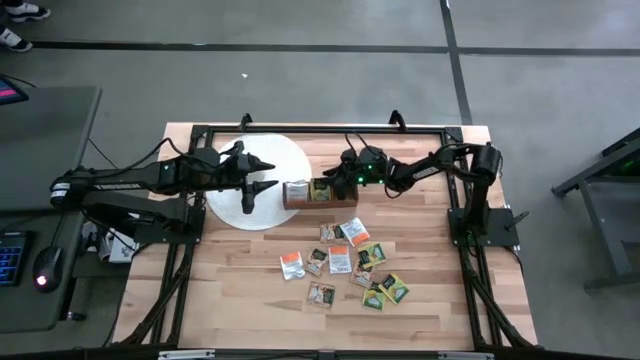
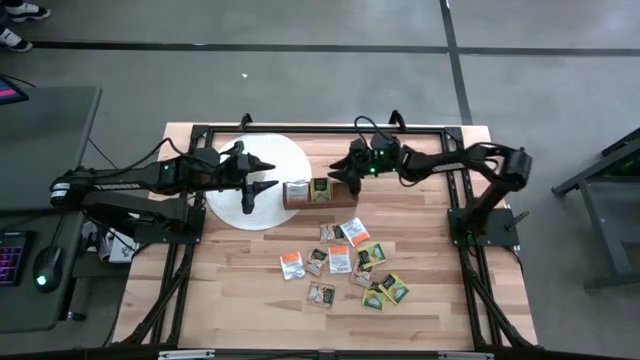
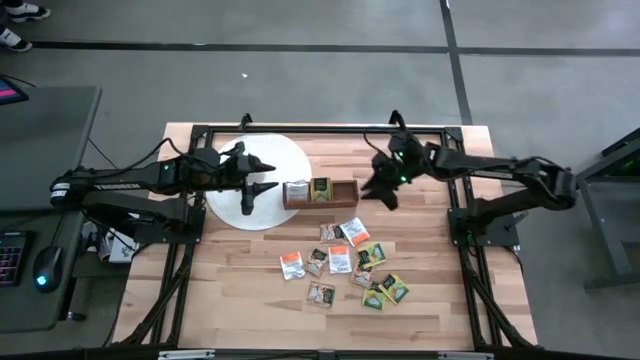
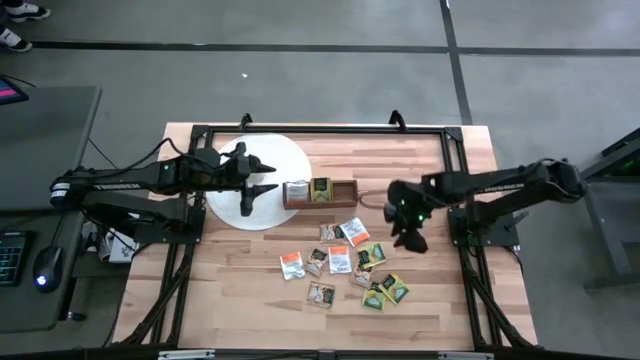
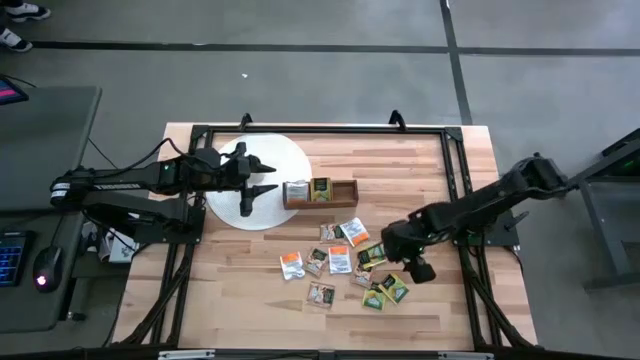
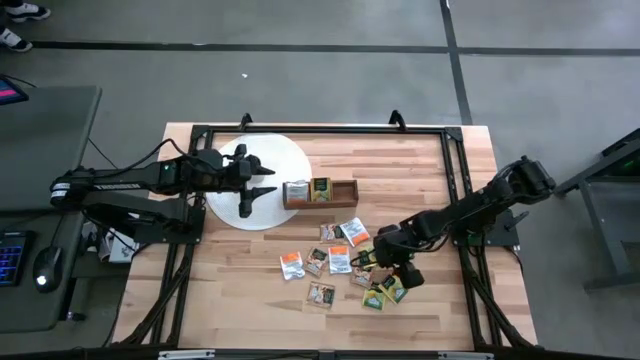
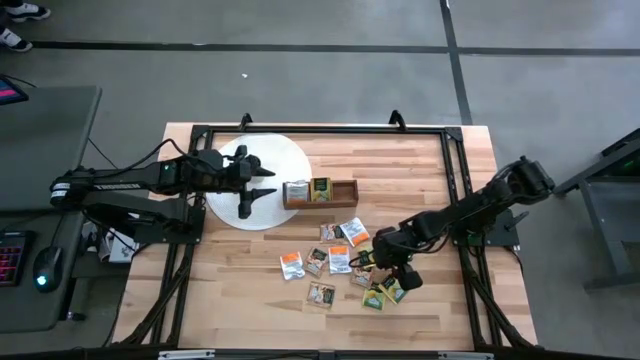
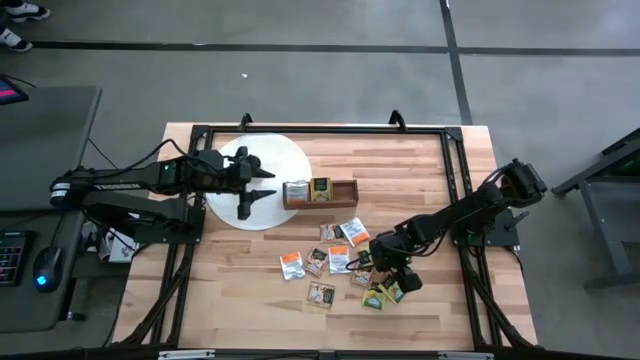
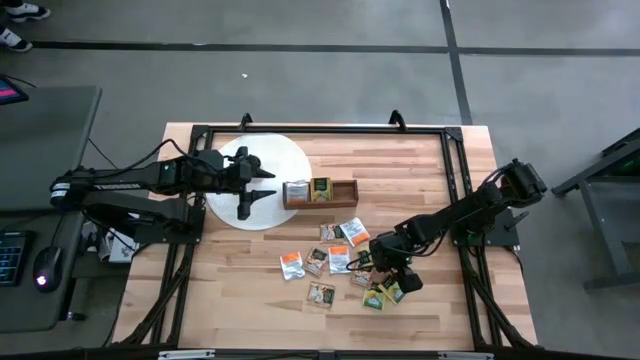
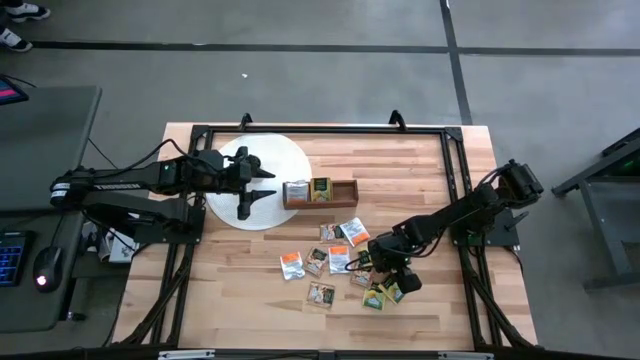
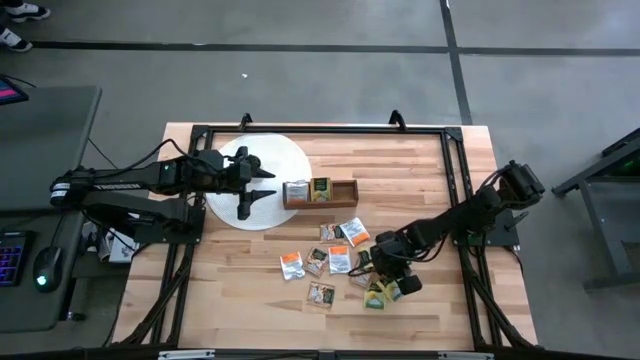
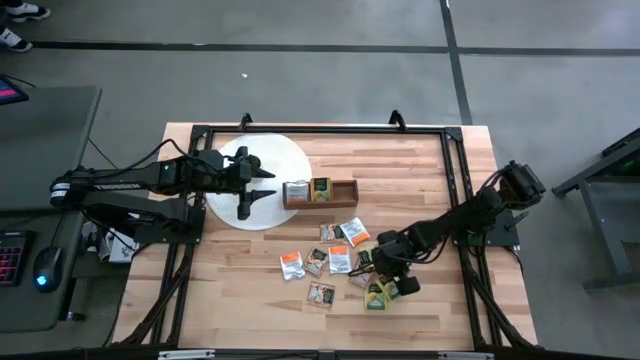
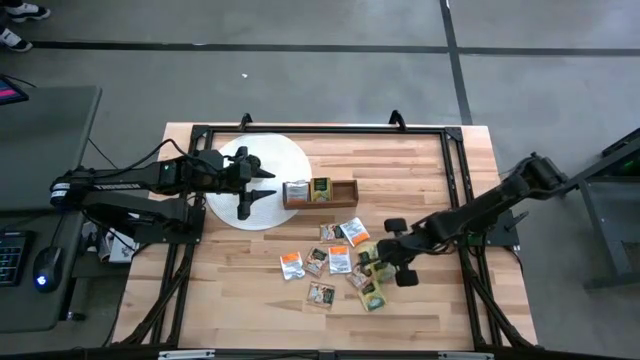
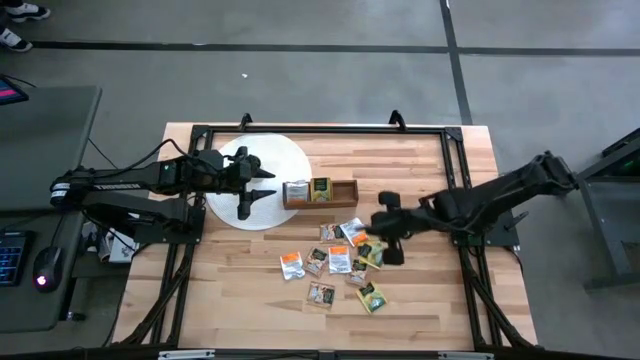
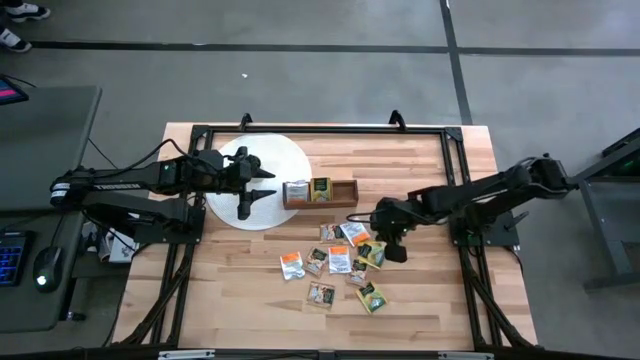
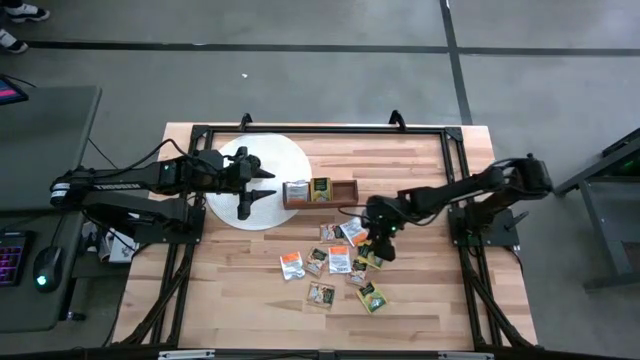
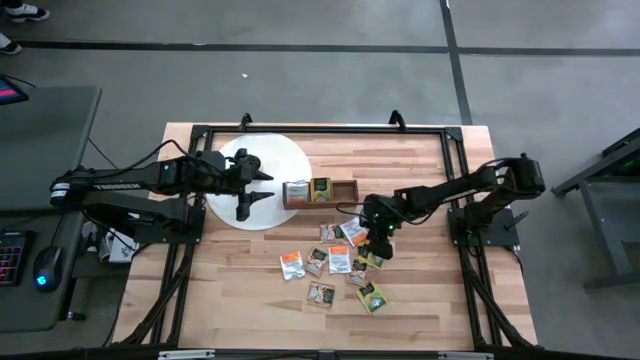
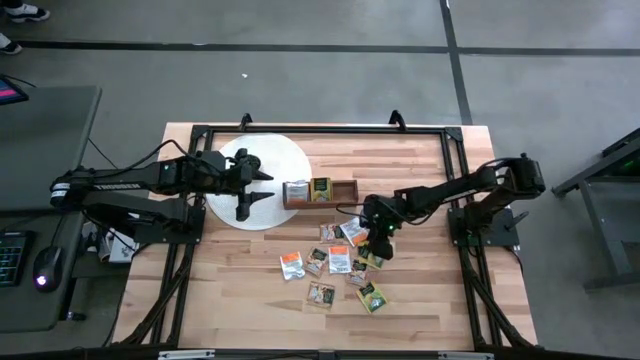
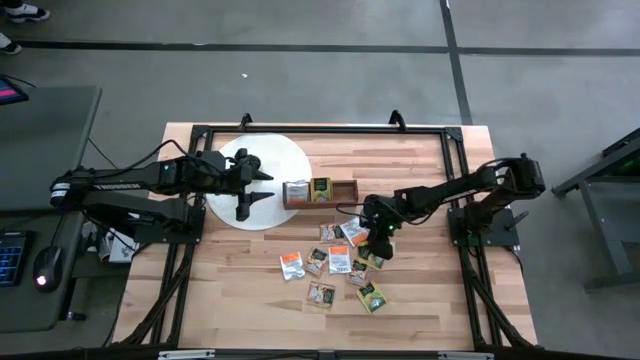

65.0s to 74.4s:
Task: Pick & Place Tea
Put the yellow tea bag into the middle section of the wooden organizer

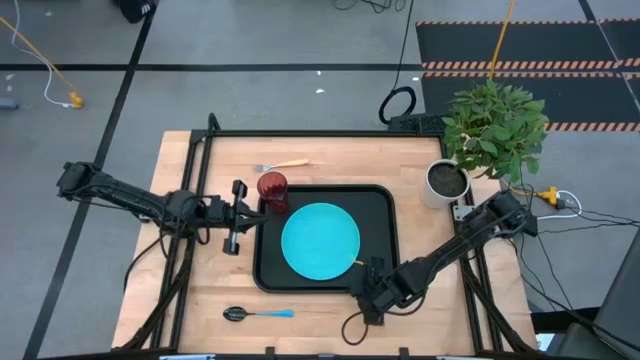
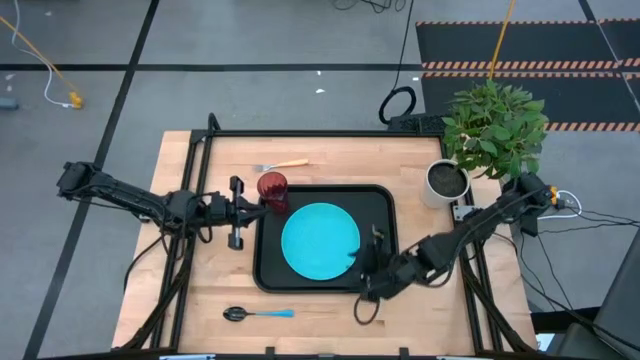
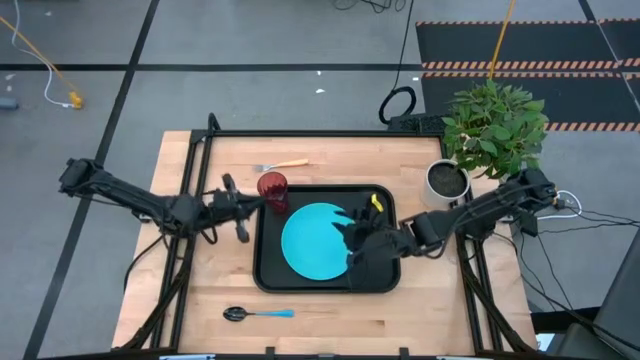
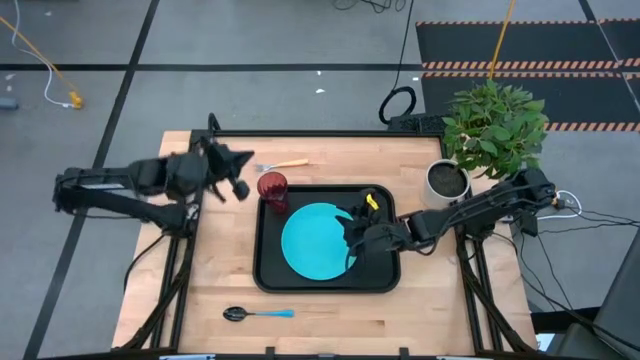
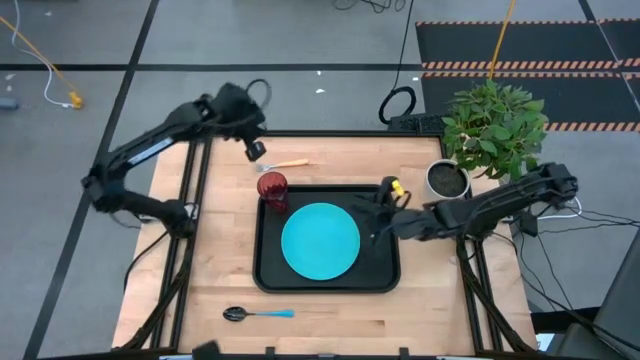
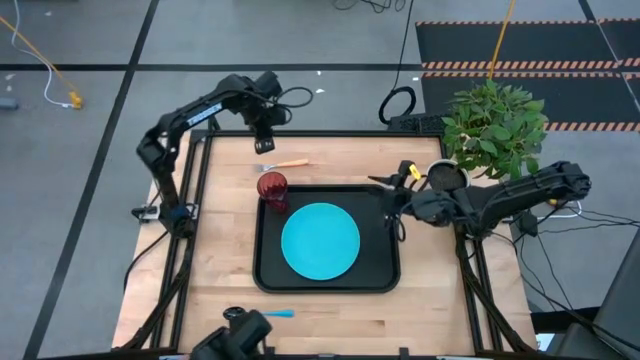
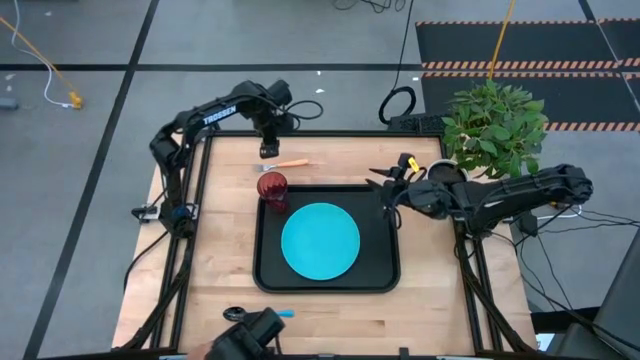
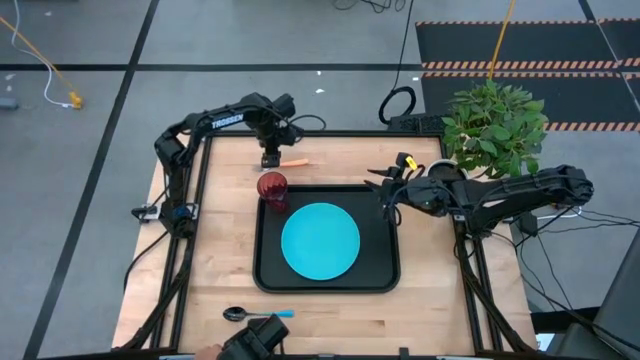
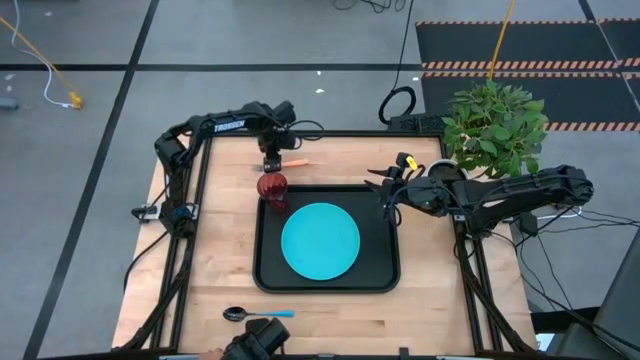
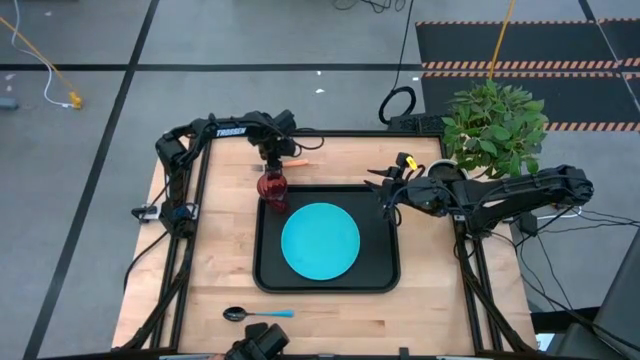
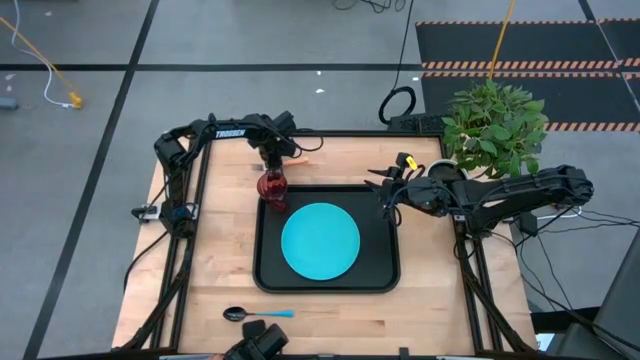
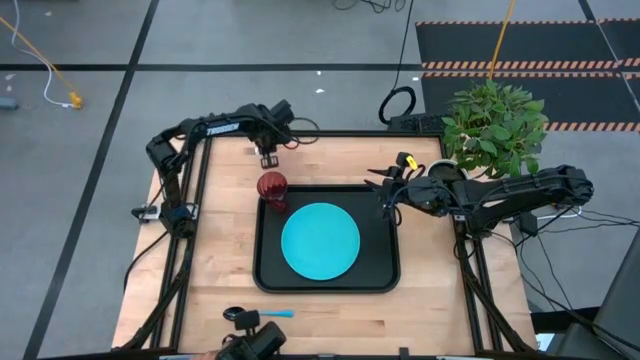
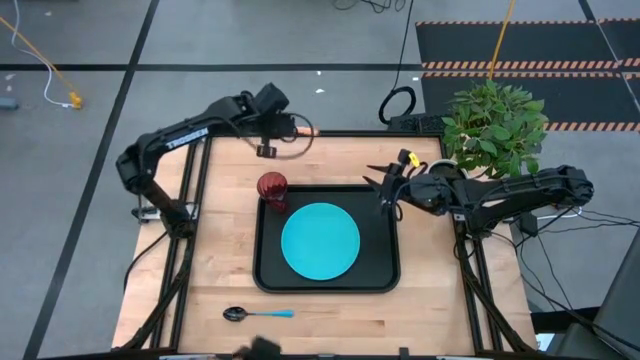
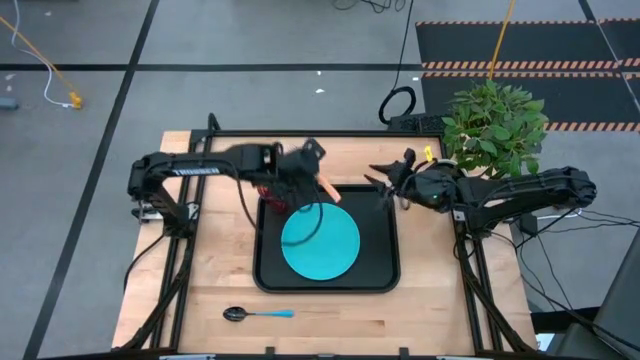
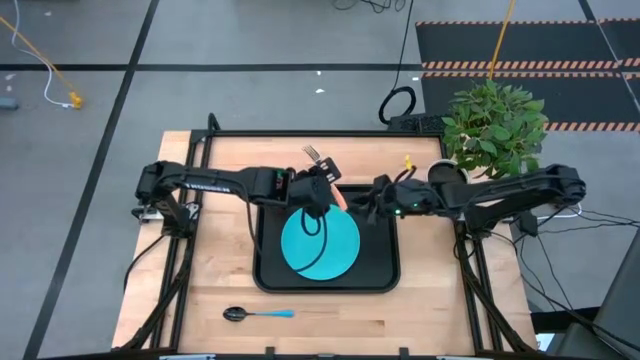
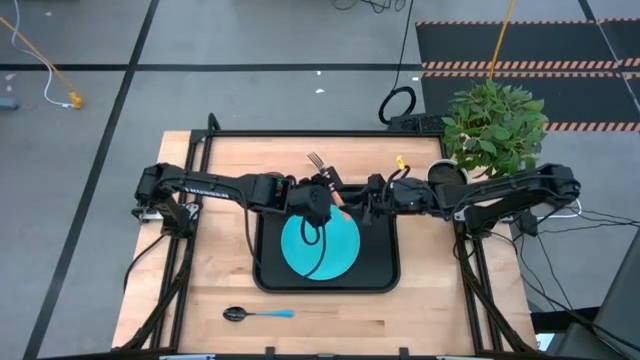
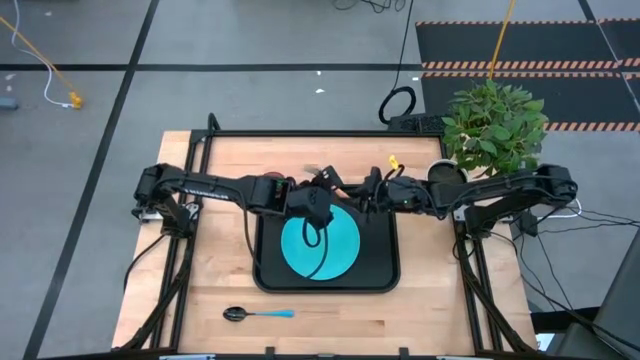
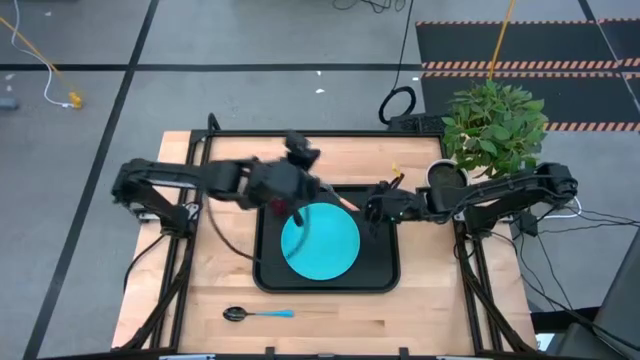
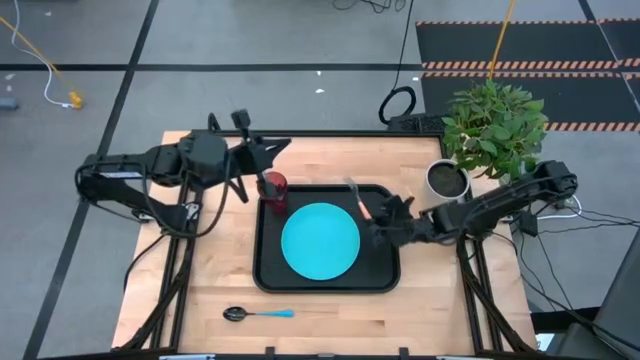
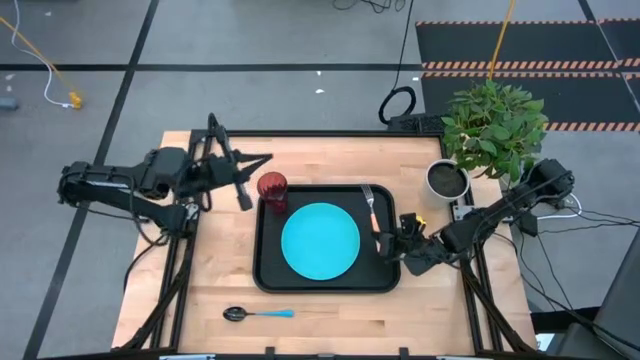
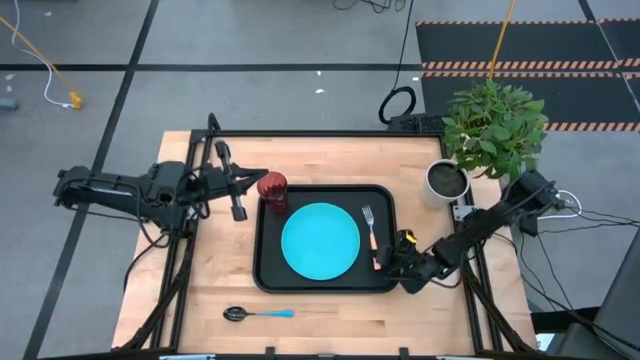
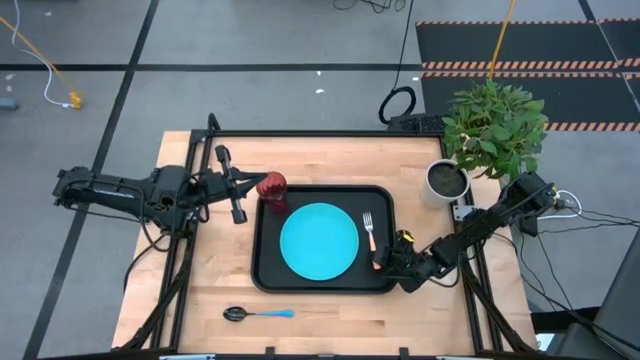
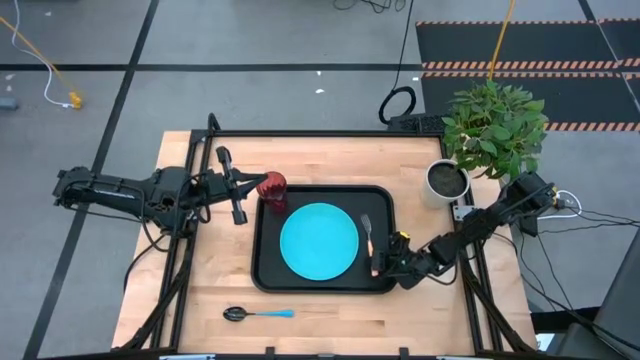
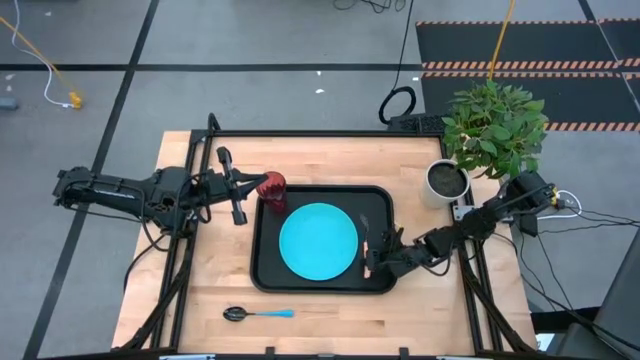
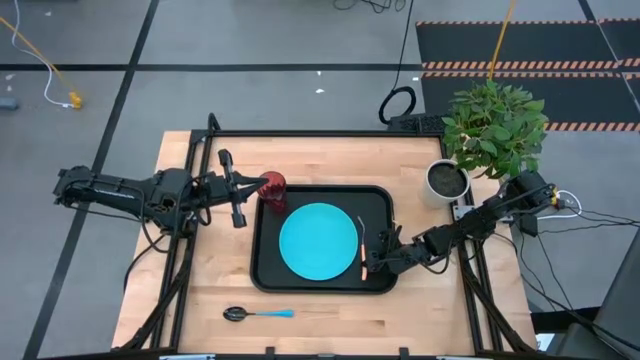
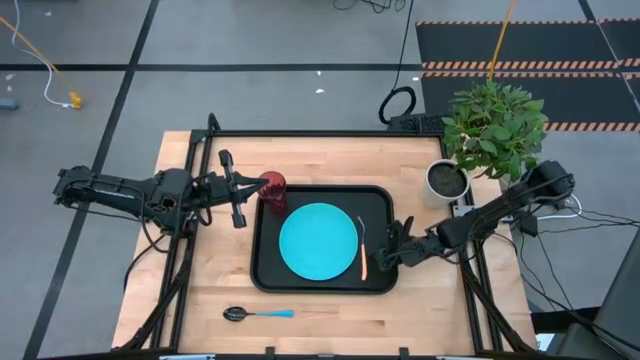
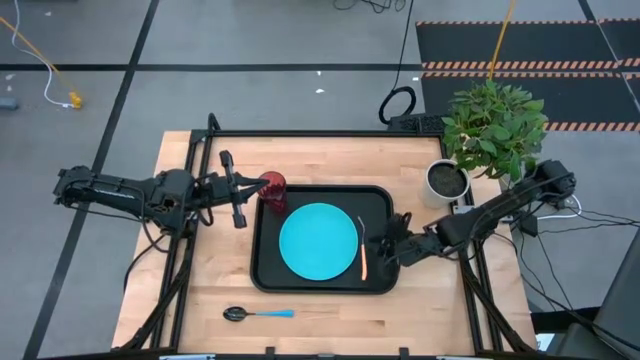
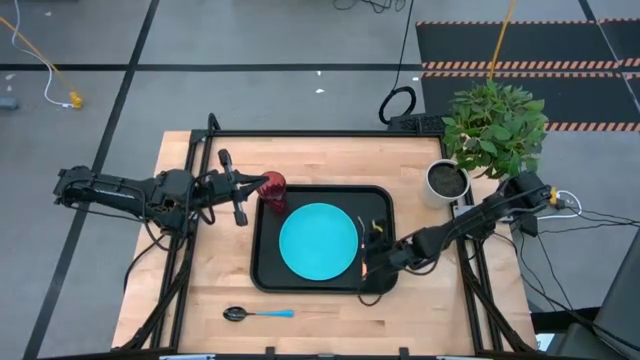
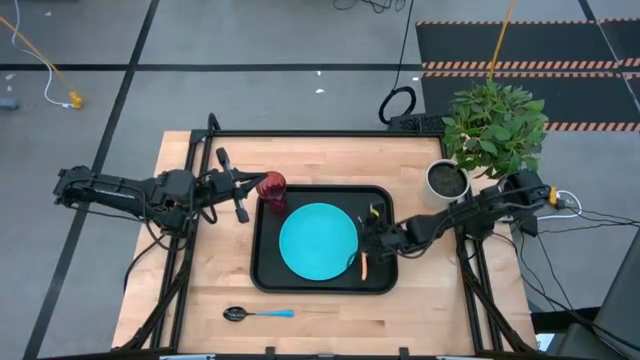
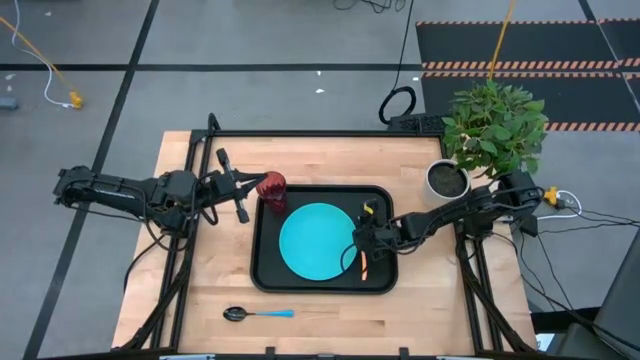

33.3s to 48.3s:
Task: Pick and place plate/cup/fork/spoon on tray
Put the orange fork to the right side of the blue plate on the black serving tray
